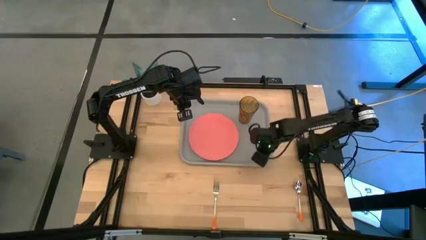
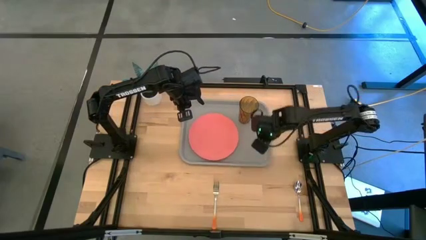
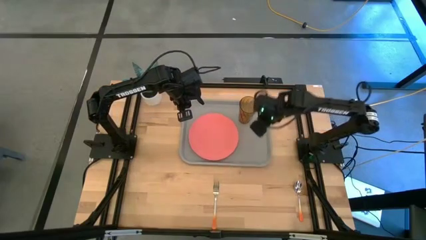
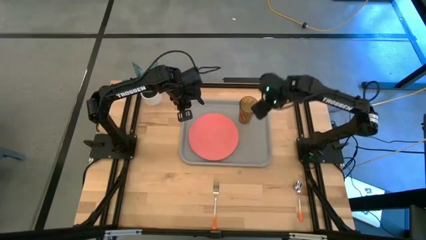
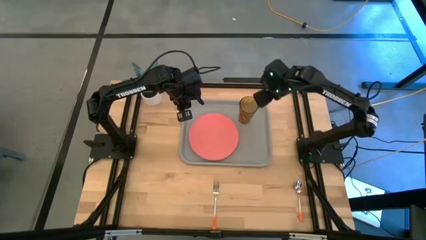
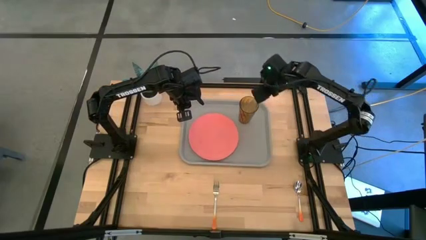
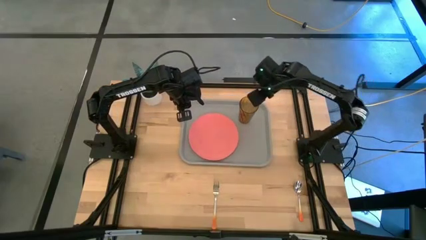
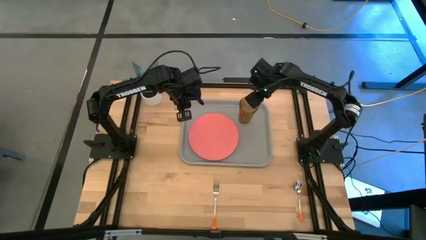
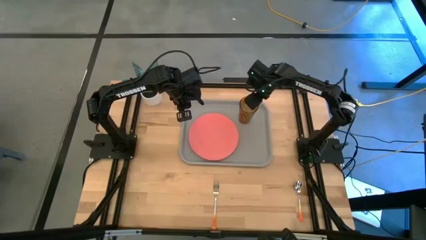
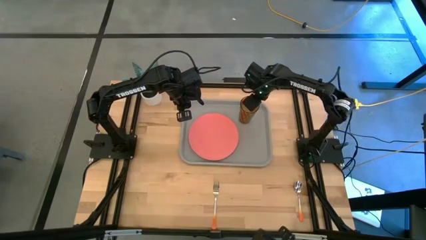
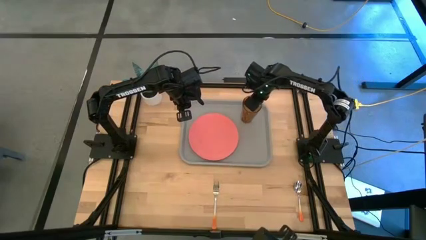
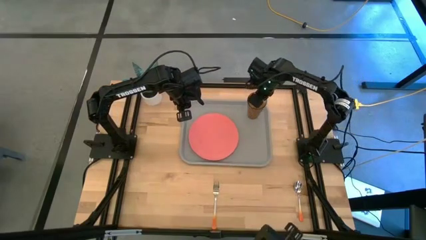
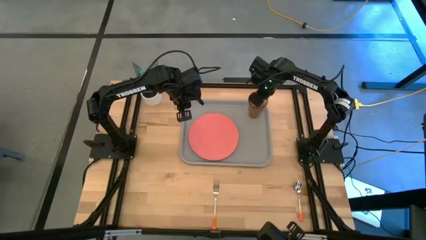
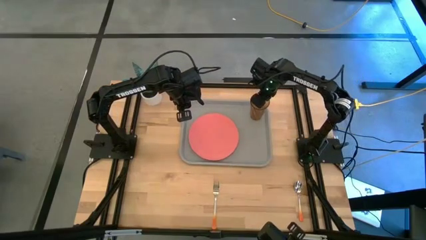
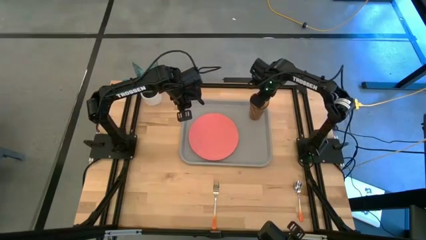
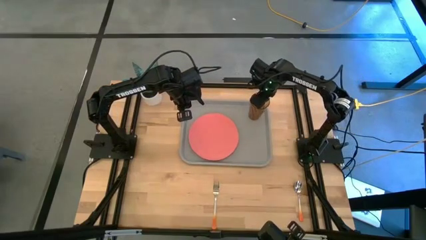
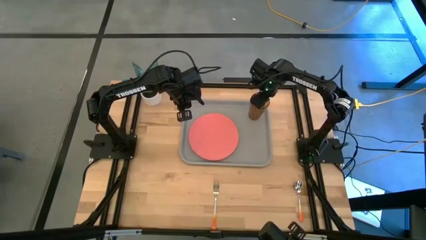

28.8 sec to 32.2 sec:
Task: Pick and place plate/cup/fork/spoon on tray
Adjust the brown cup

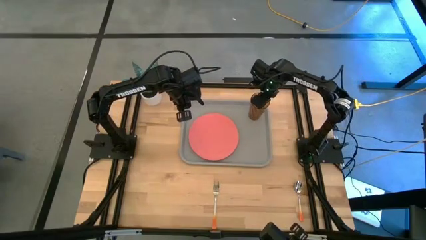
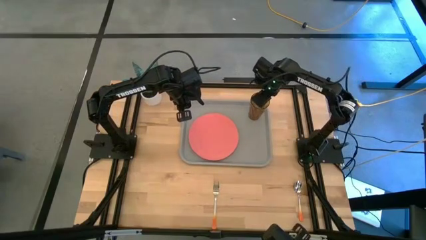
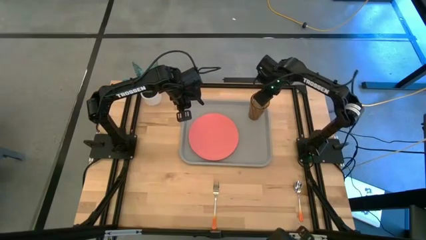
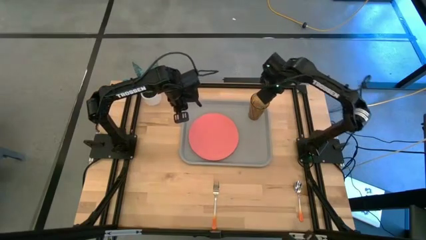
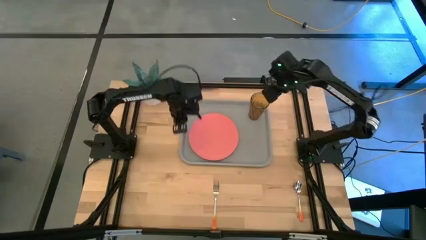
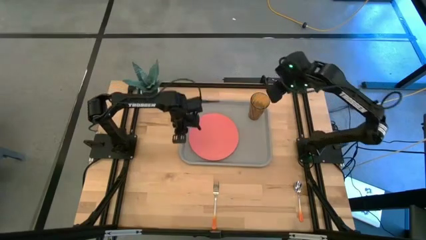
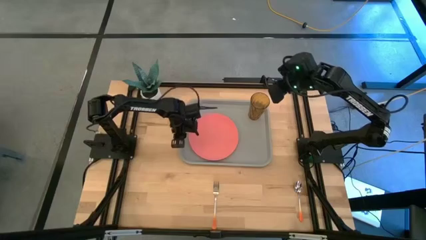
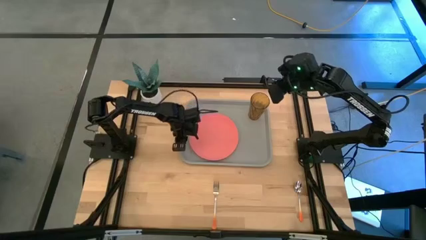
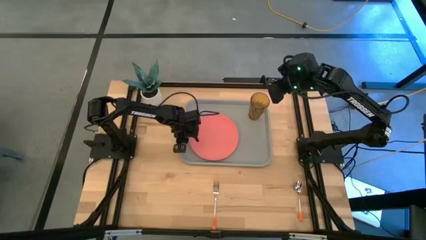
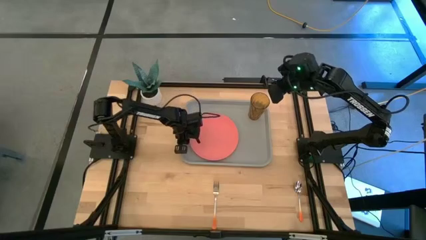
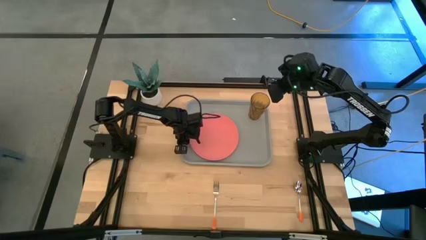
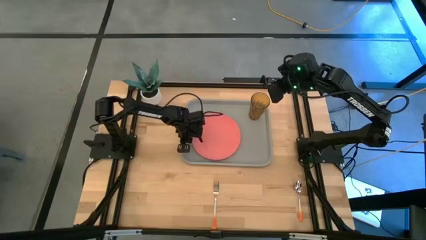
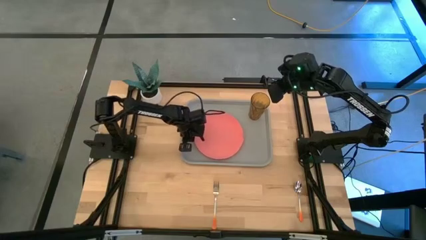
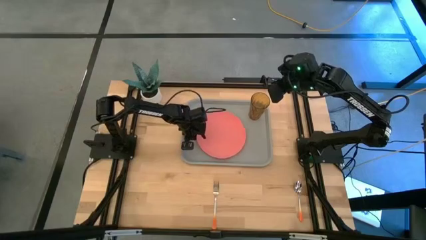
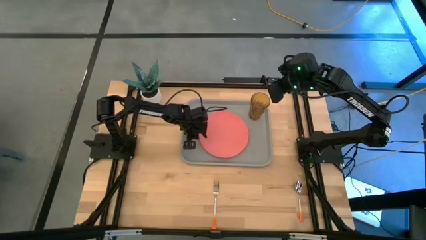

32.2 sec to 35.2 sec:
Adjust the pink plate

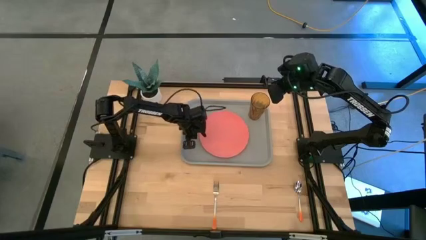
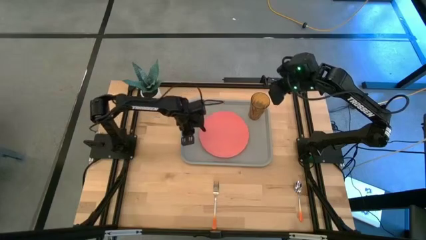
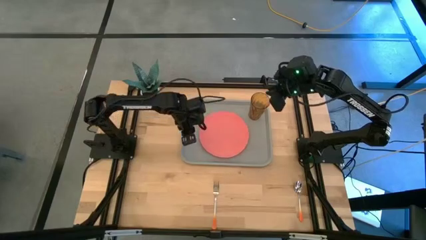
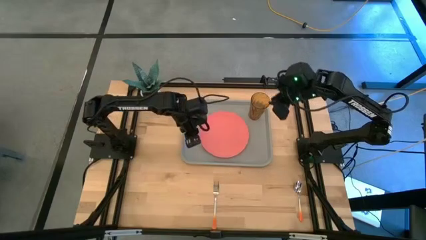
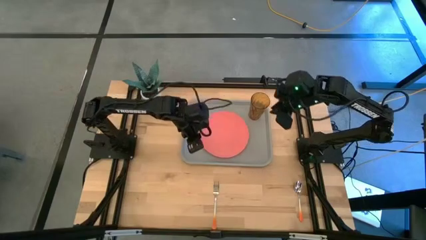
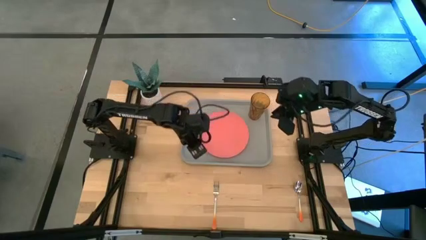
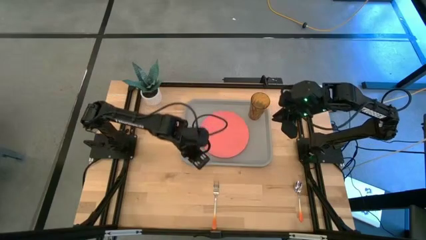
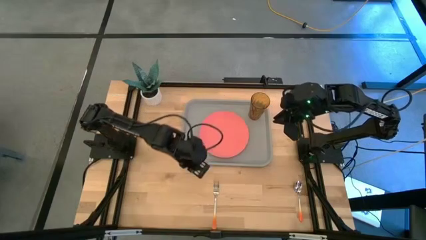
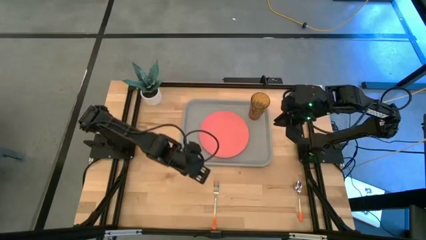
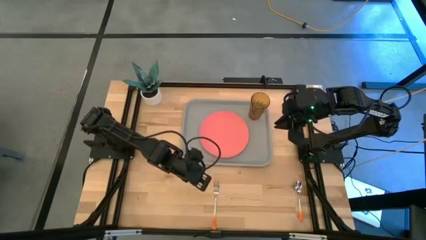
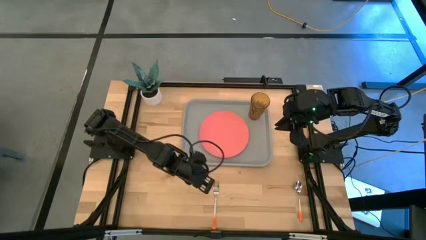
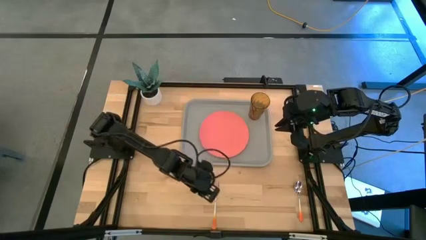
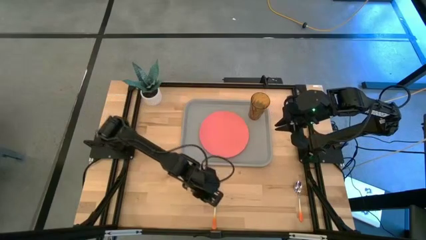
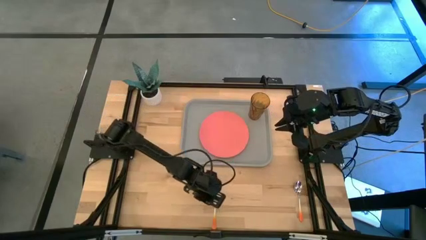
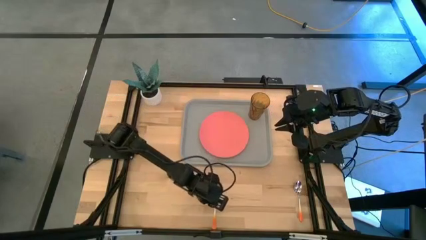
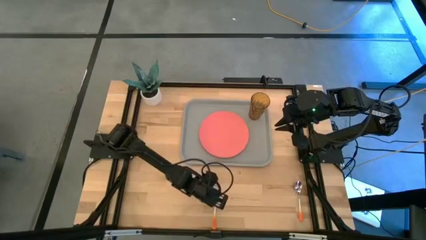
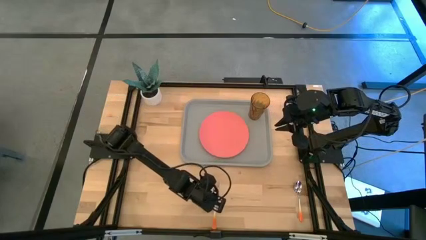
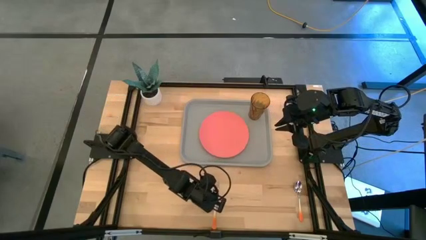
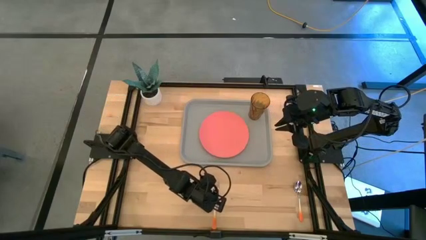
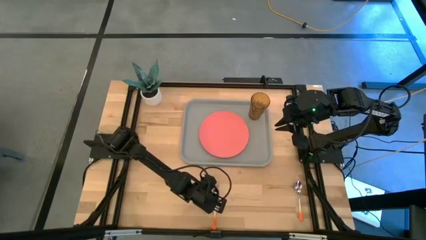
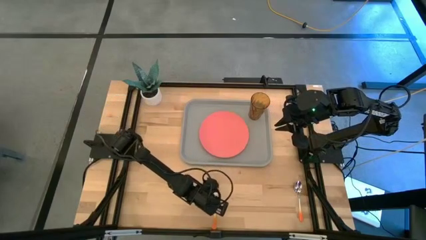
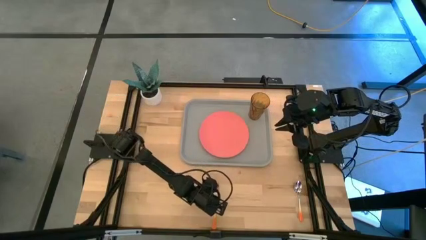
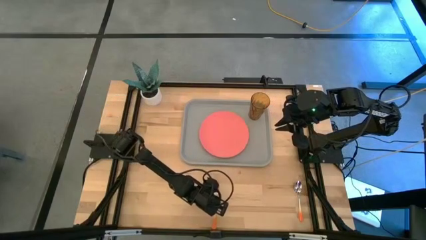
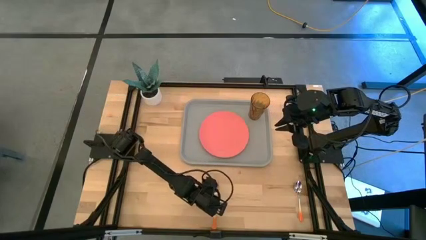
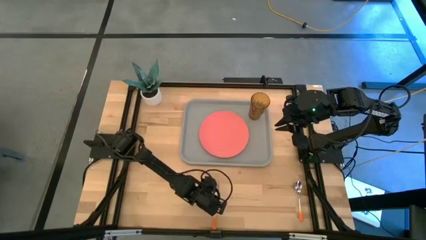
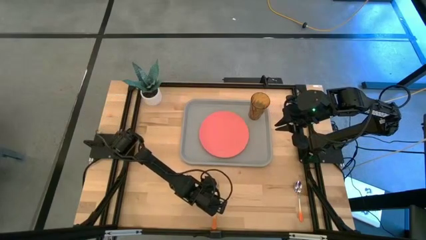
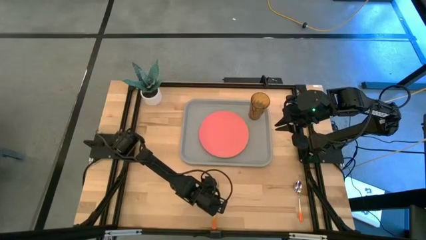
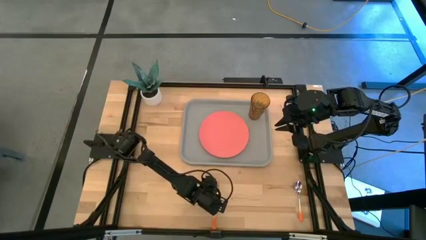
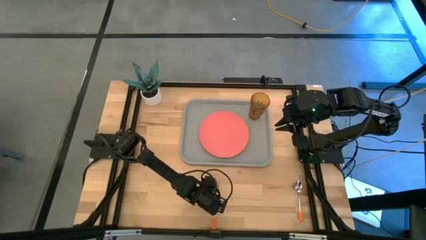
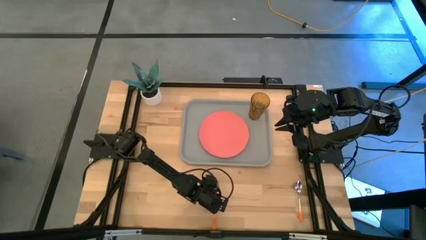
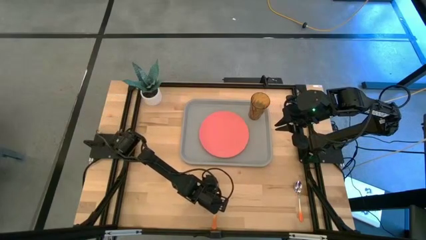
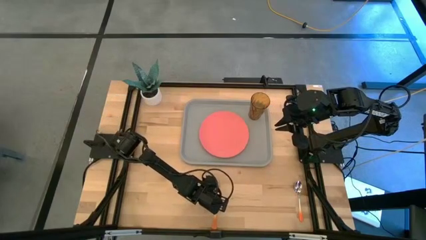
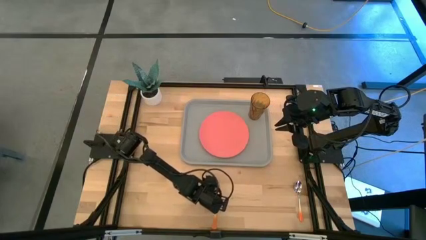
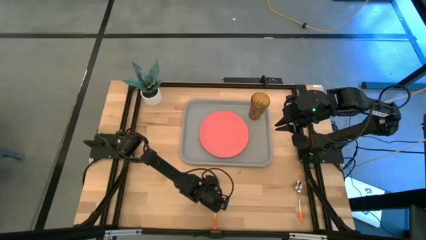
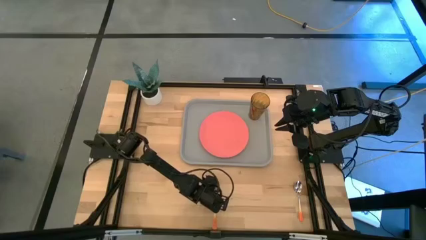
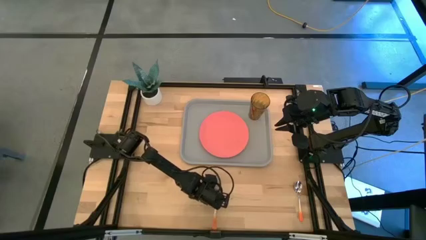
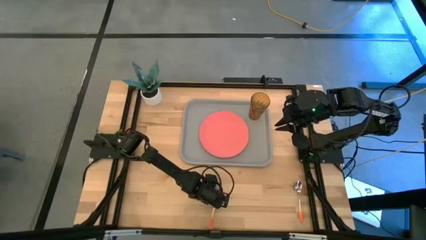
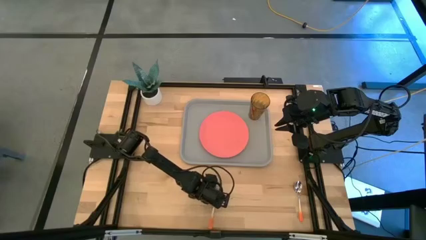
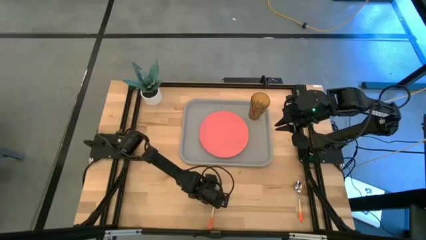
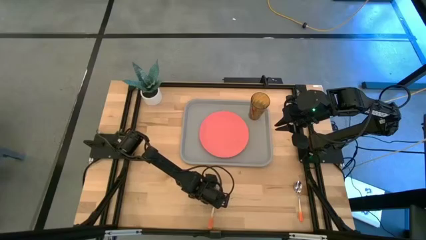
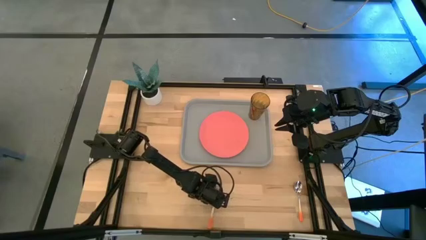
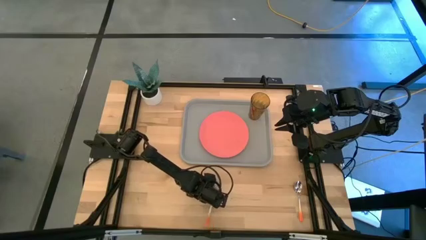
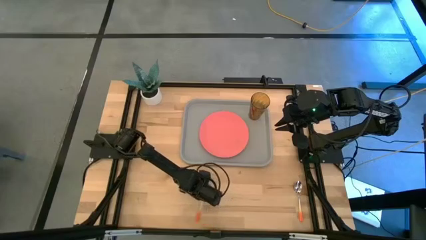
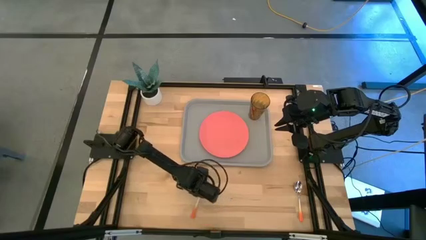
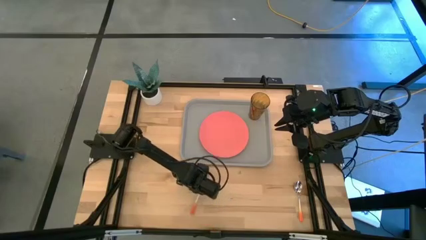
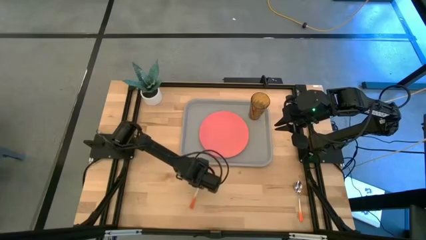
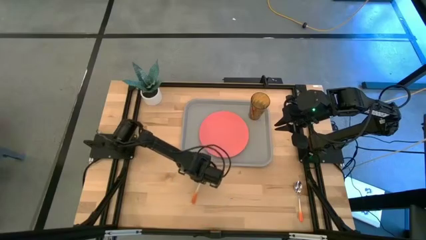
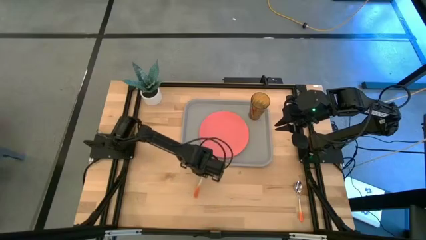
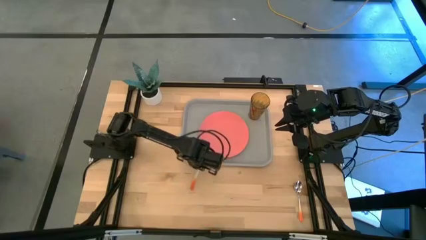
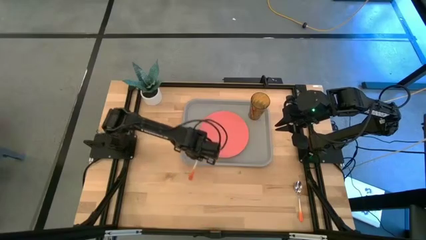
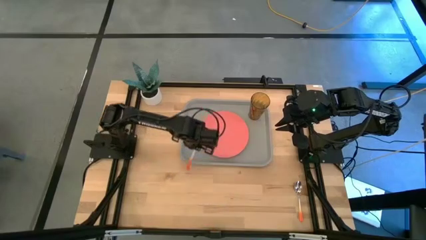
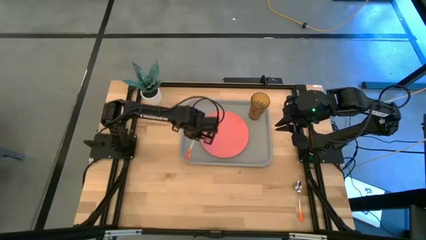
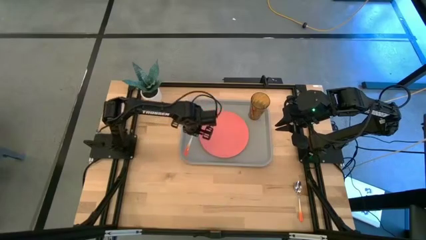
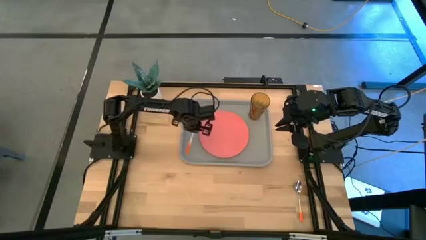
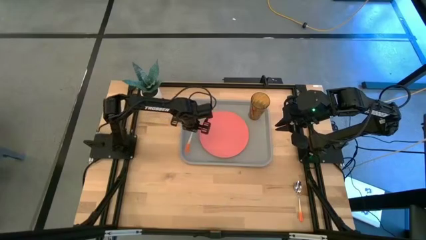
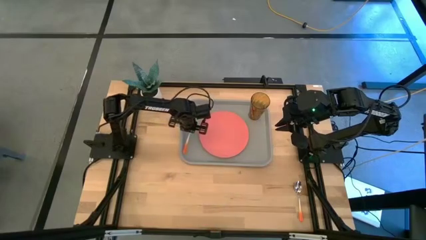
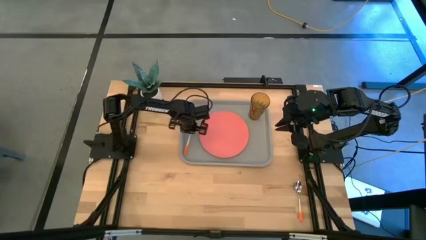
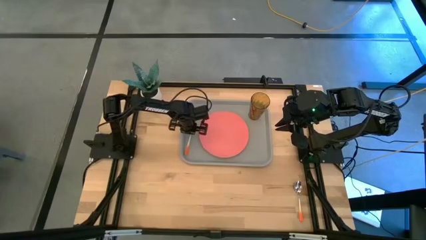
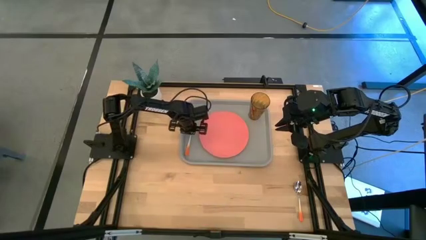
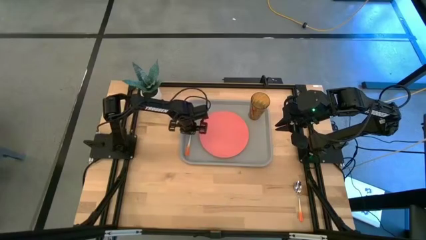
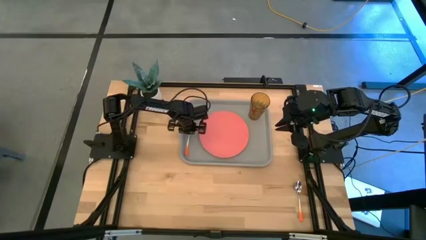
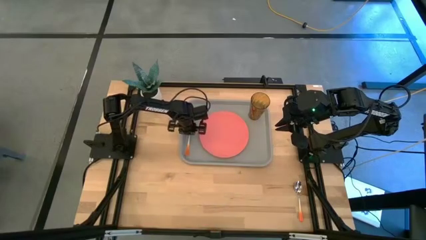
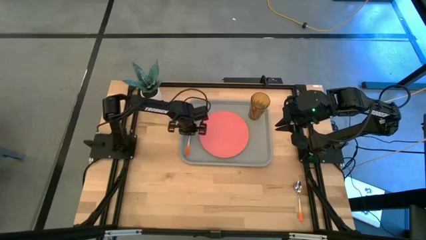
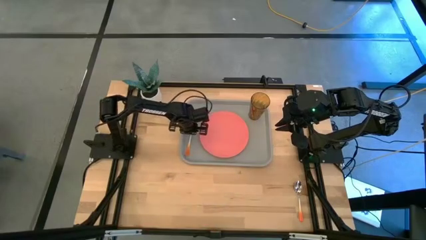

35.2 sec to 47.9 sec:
Put the orange fork on the left side of the pink plate on the gray serving tray
